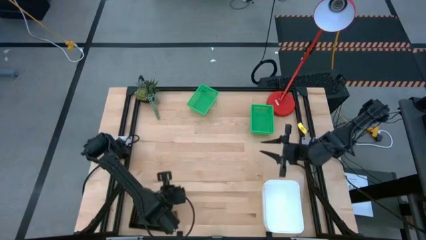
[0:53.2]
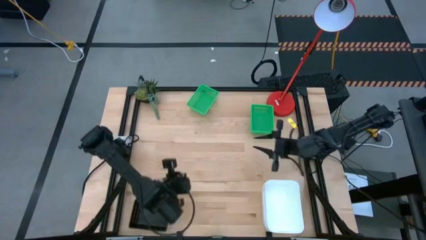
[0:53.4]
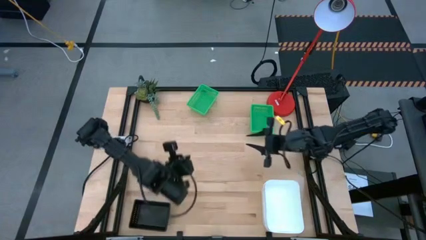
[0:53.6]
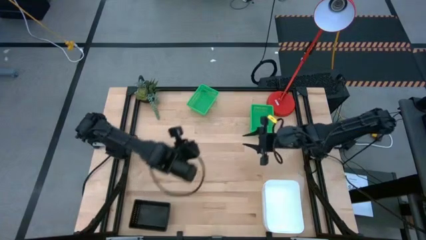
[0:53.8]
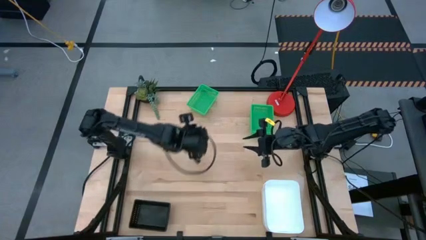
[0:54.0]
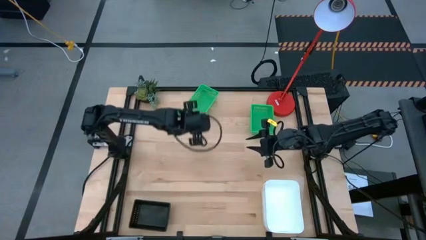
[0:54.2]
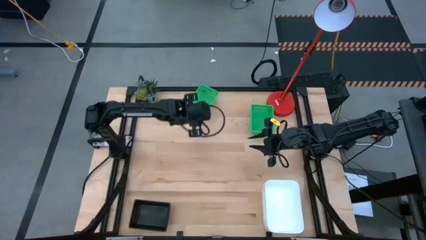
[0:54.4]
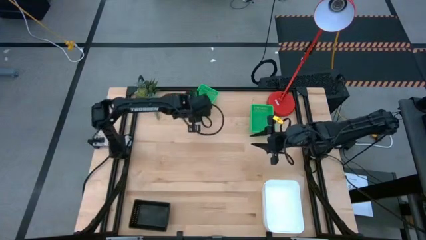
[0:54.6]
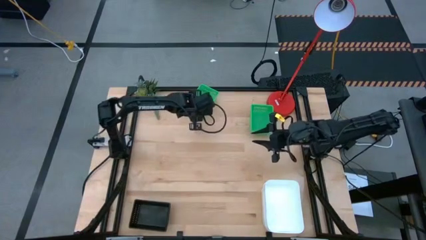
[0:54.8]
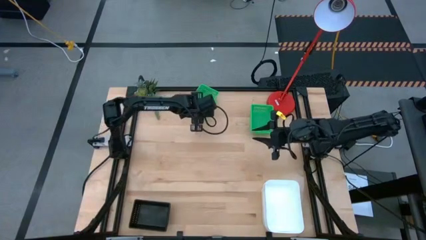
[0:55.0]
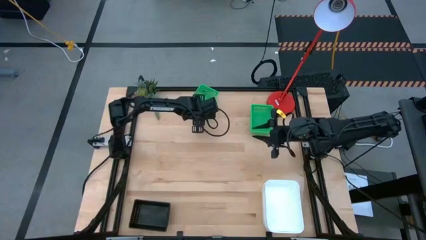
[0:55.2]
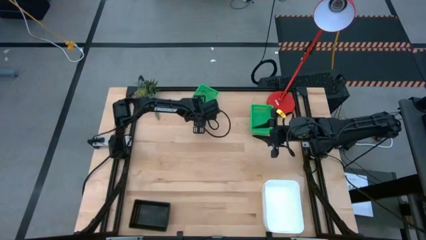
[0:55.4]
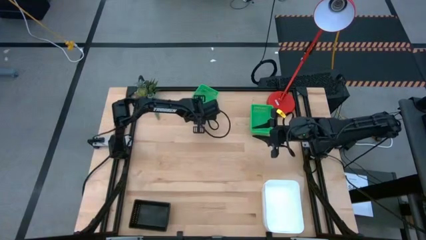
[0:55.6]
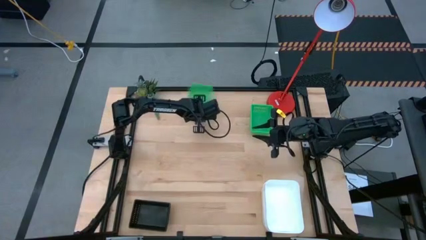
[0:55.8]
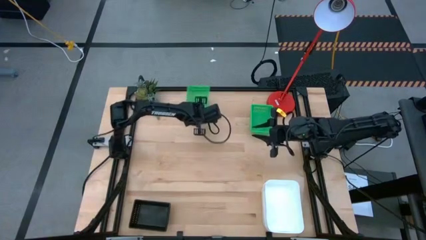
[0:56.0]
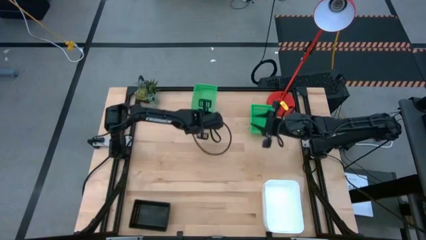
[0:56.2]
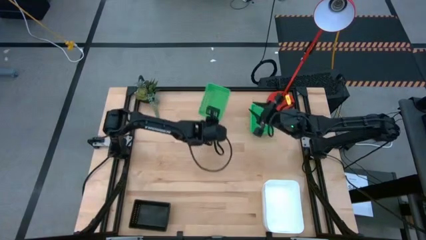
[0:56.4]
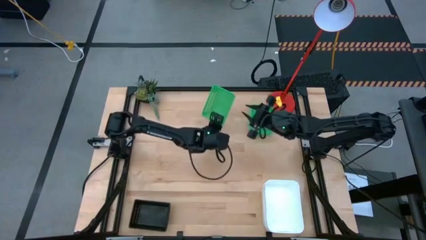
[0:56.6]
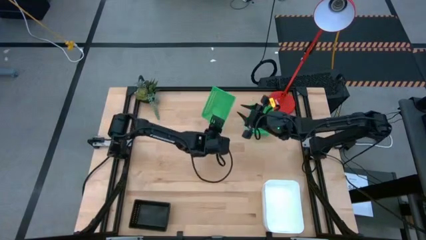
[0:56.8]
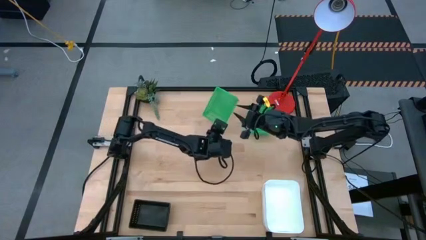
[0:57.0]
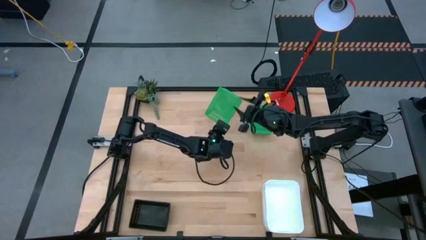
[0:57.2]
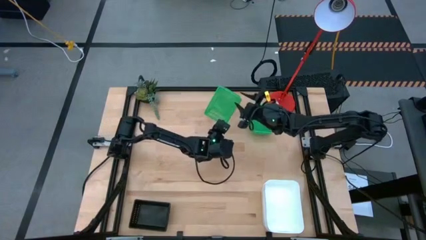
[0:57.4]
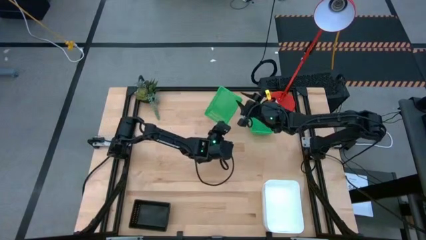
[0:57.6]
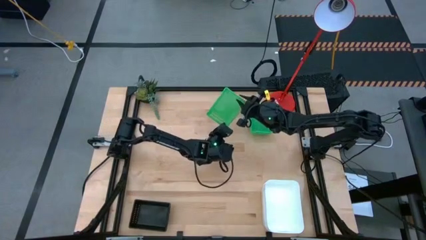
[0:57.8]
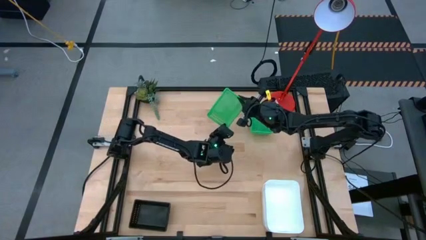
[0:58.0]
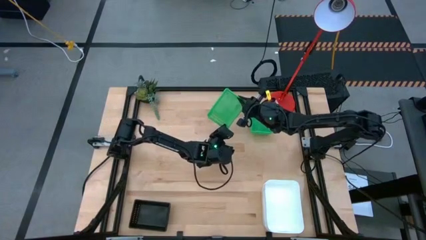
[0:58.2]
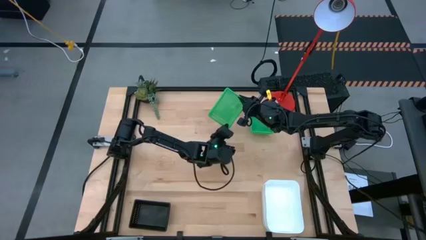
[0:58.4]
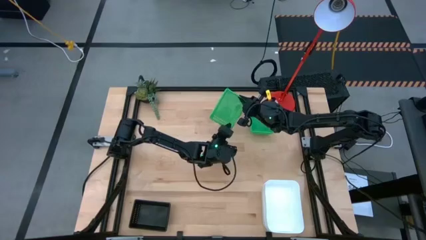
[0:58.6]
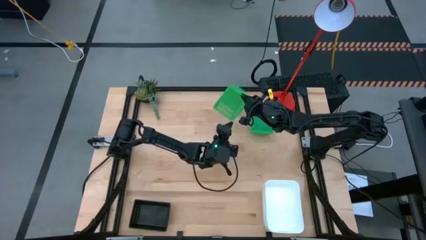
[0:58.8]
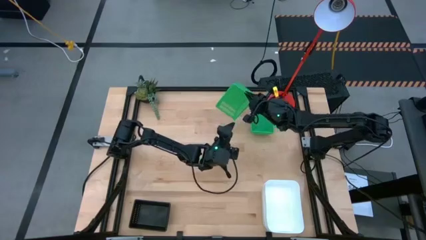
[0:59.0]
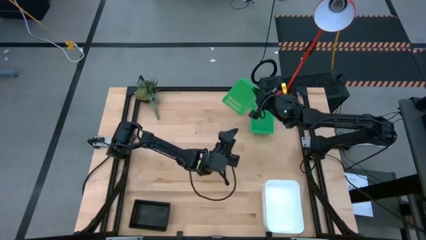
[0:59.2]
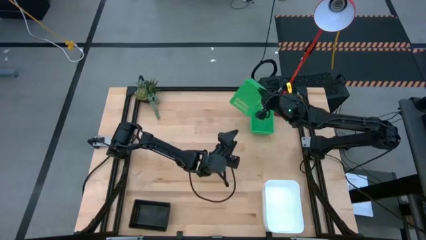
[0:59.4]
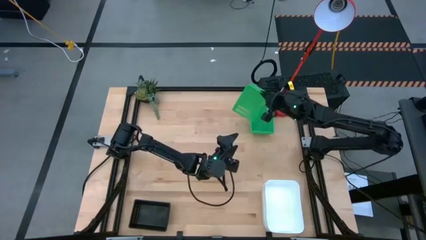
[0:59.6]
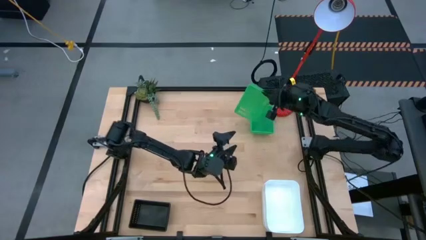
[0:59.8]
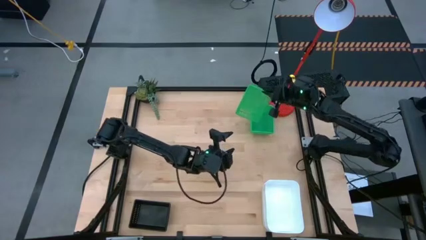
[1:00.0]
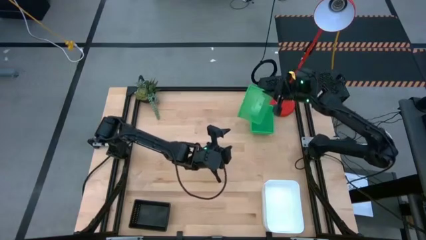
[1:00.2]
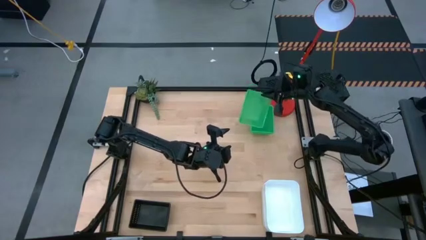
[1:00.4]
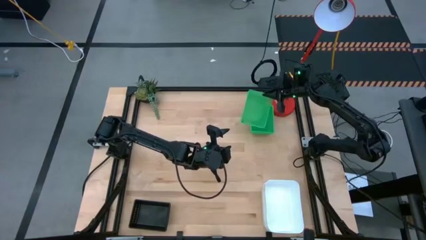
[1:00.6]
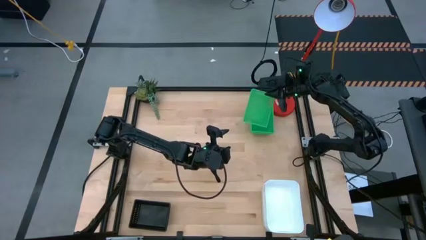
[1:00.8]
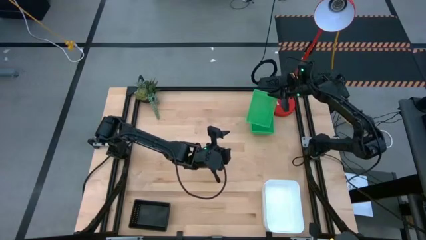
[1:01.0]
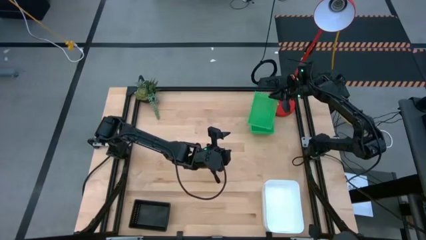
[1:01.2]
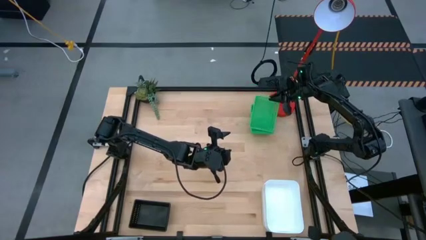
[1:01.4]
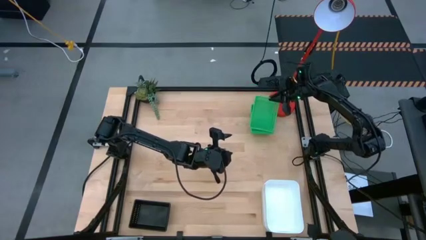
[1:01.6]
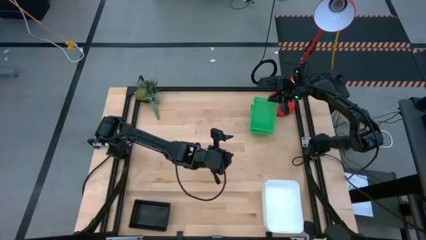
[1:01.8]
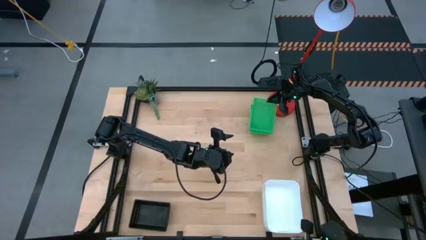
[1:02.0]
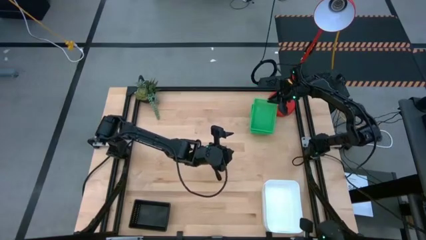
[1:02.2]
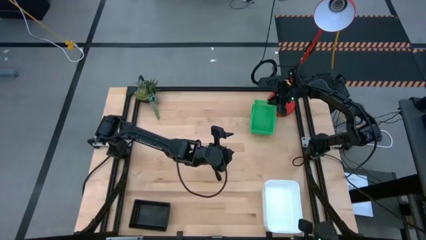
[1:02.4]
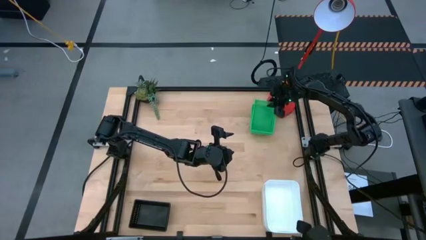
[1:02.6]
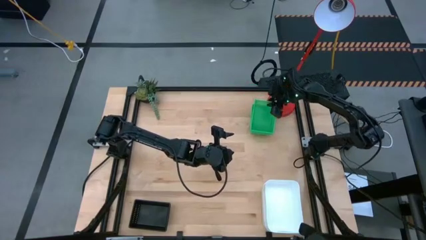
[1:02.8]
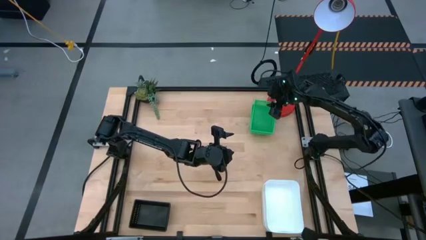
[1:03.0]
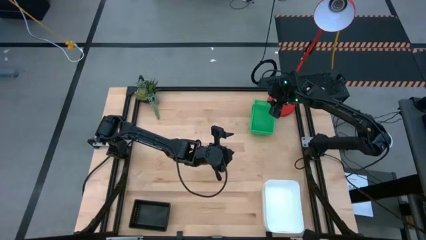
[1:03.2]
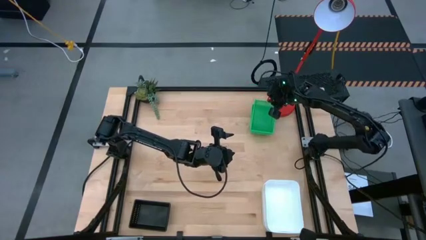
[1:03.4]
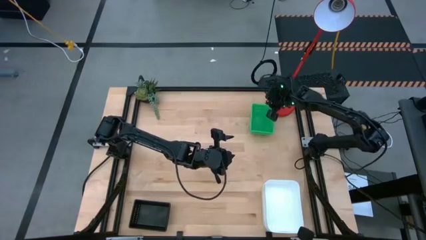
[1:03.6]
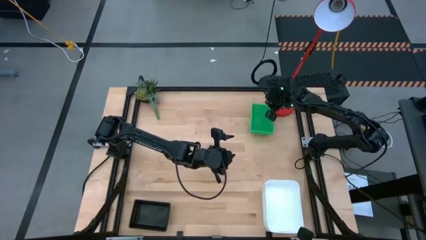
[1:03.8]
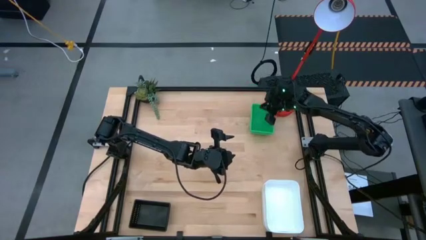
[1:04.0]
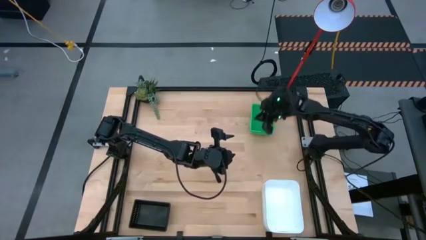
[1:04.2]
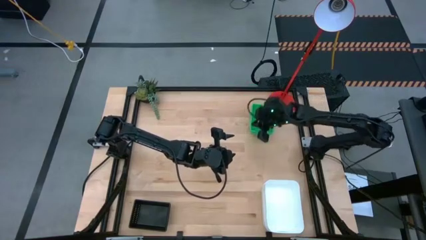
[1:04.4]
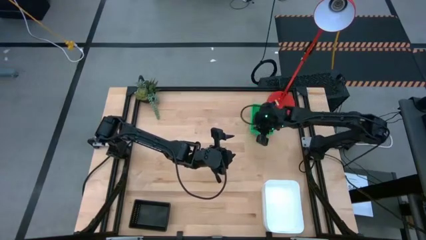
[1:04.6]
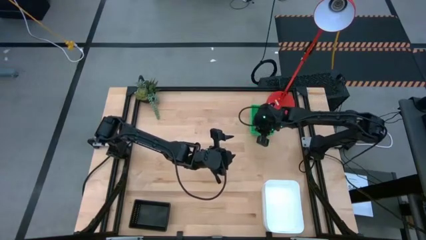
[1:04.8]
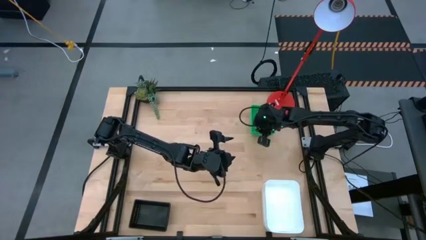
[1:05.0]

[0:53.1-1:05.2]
Stack the left green bin on top of the right green bins
